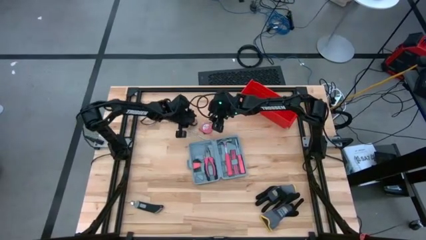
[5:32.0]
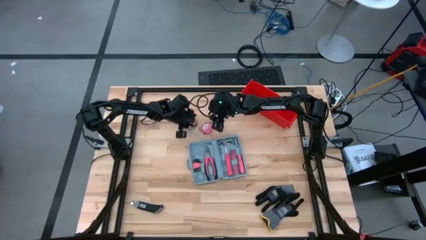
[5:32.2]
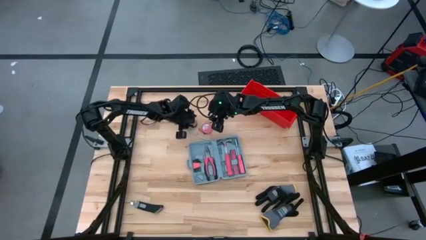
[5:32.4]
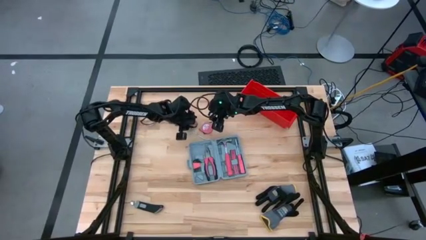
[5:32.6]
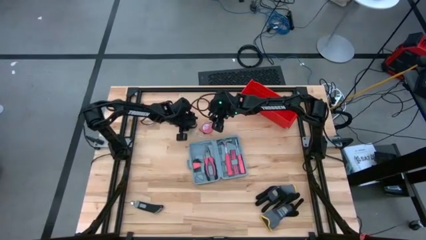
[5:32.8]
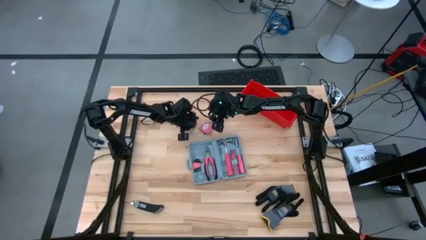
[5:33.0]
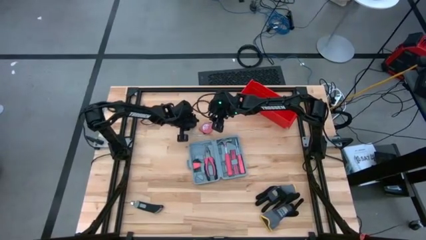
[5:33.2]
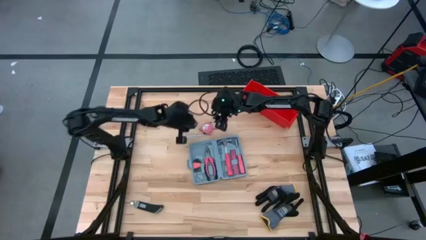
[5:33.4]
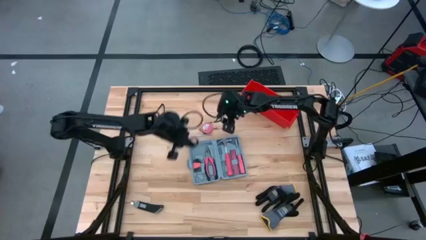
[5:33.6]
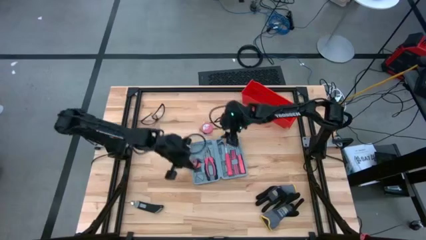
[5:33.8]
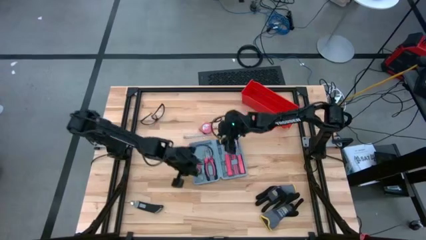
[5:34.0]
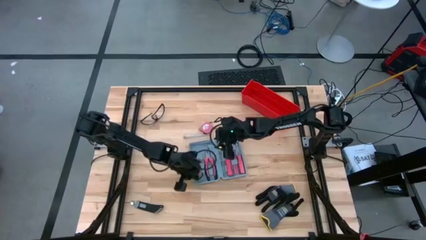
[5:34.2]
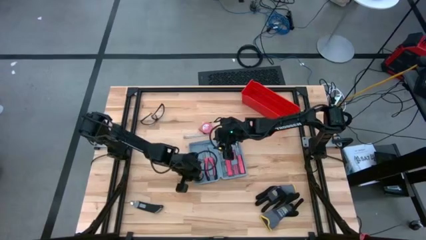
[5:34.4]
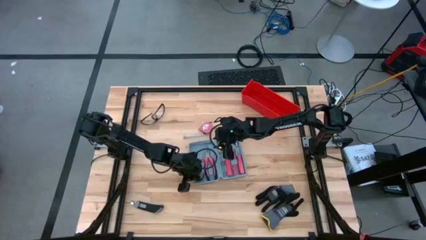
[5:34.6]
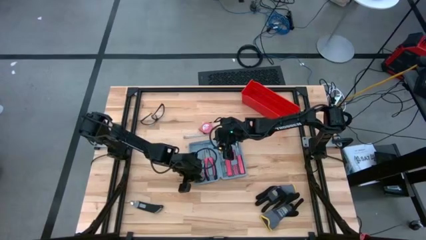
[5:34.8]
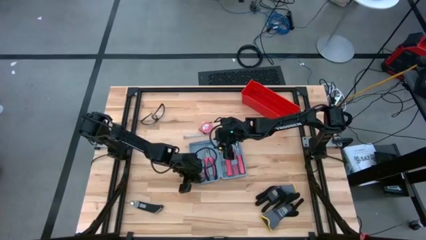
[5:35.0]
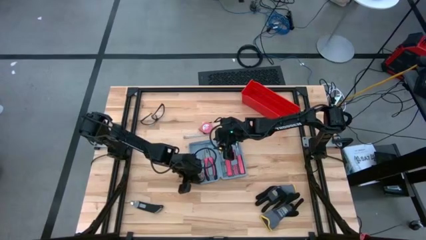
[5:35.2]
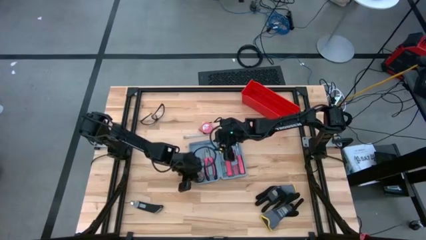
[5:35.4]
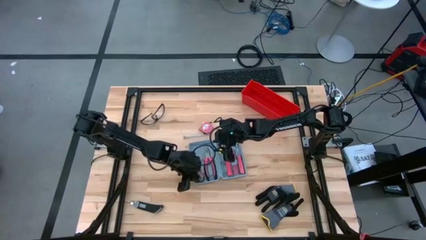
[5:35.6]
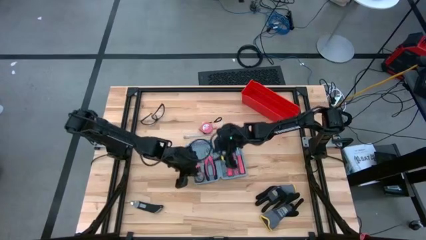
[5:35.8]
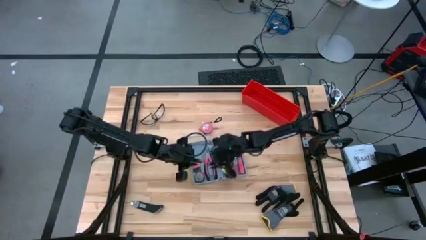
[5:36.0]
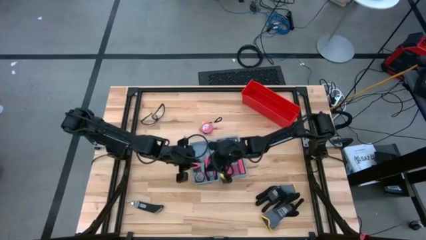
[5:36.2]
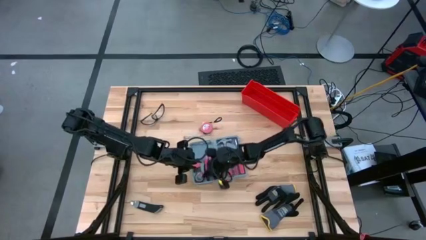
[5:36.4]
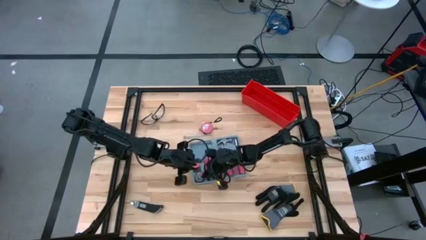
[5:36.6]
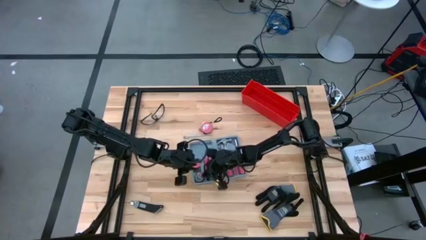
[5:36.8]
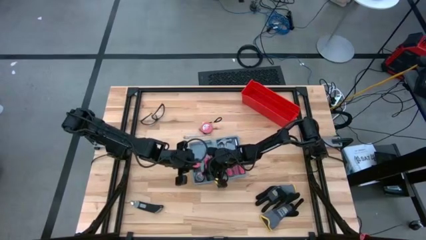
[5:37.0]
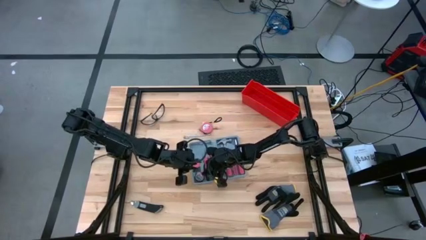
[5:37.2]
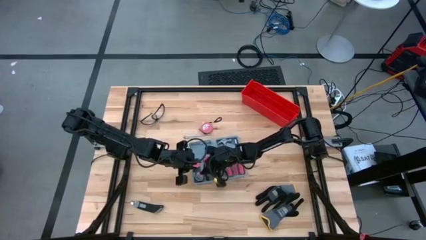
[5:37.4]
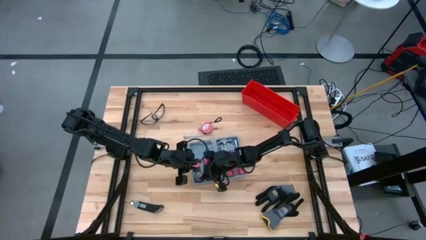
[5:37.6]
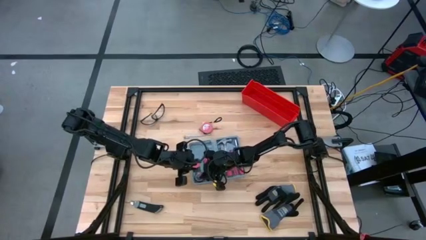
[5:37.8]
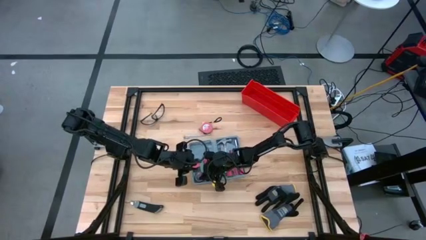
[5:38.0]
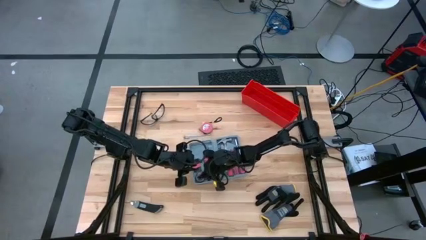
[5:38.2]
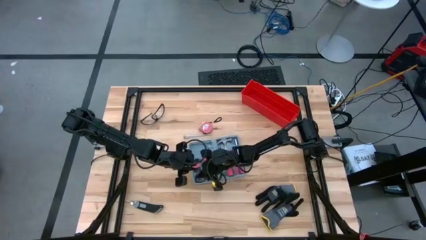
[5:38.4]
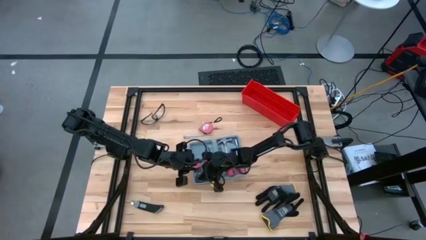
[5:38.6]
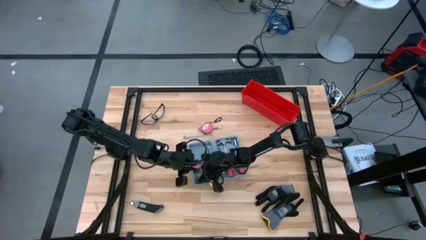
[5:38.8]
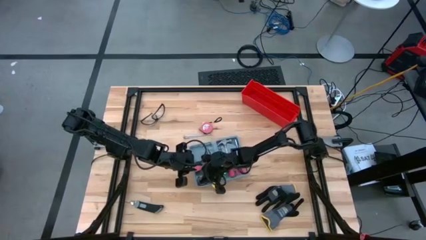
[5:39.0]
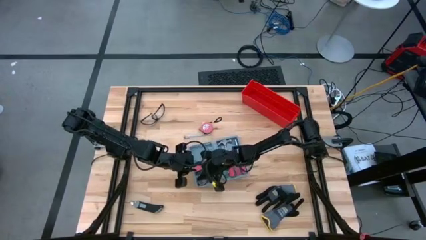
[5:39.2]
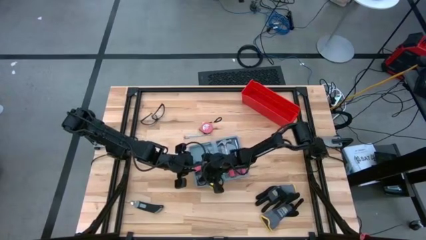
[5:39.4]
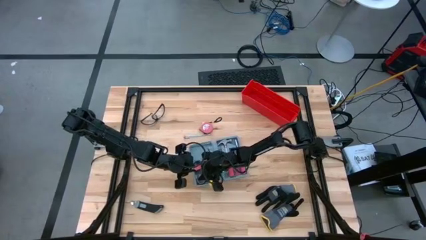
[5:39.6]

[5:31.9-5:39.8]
Task: prefit tool cases
Put the electrical tape into the toolbox

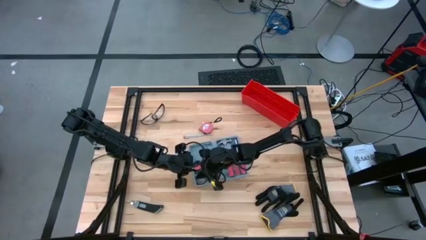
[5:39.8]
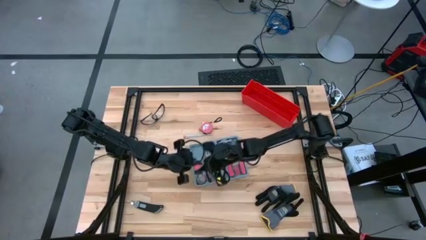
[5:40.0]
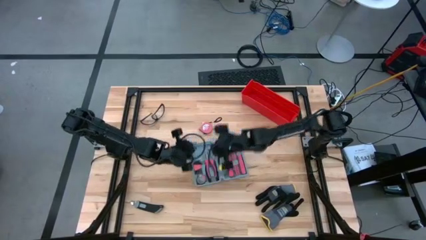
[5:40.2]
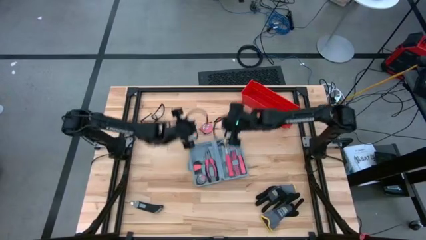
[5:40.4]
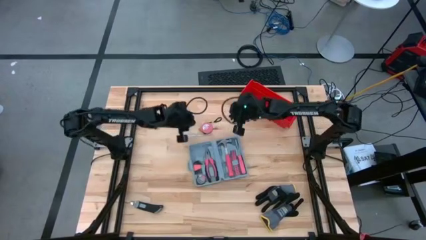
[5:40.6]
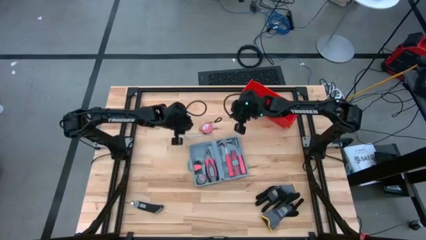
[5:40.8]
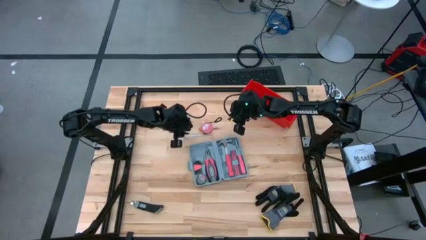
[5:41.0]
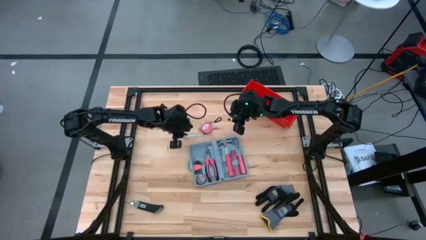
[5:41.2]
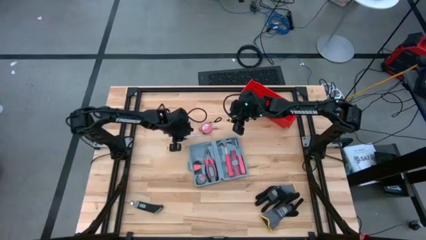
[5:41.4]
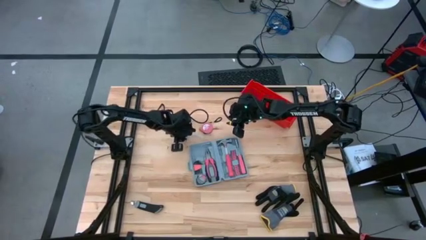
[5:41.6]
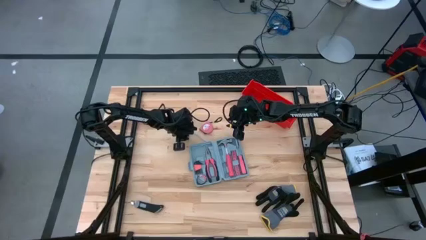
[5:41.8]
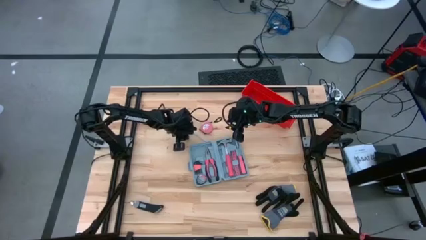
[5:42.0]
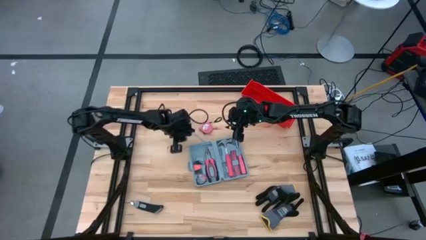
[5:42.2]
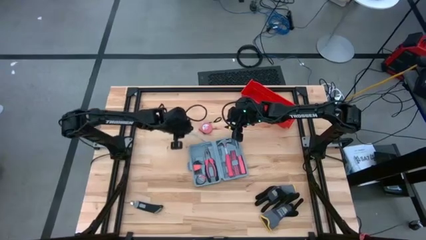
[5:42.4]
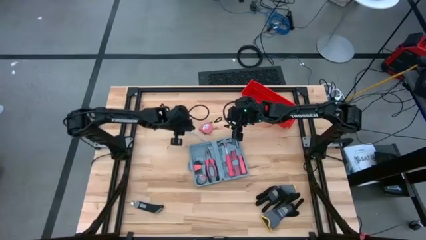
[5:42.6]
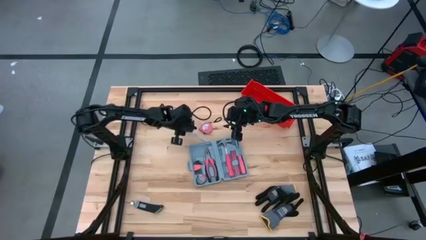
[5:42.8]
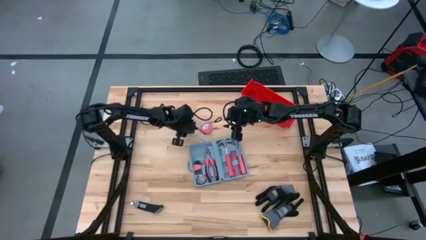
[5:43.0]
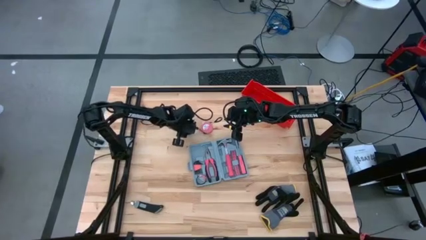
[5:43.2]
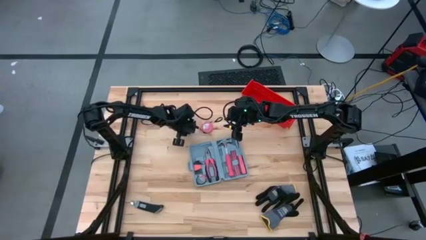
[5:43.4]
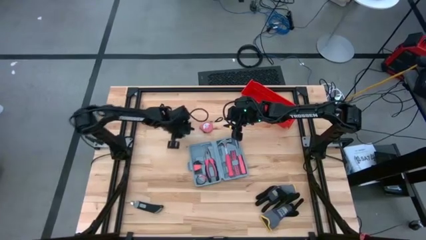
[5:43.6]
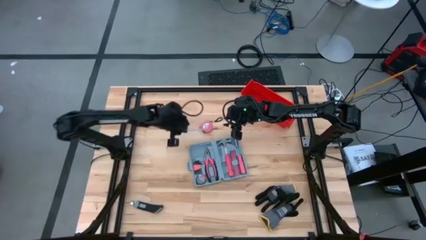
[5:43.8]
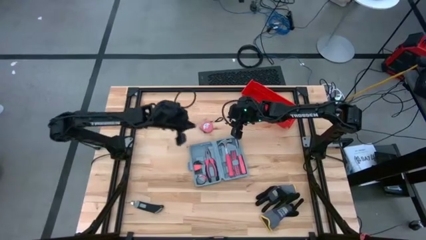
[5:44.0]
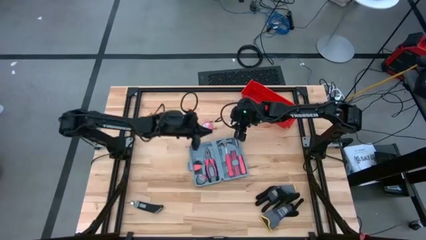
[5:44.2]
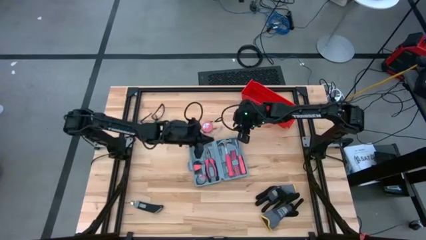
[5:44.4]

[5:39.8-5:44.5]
Put the voltage tester into the toolbox

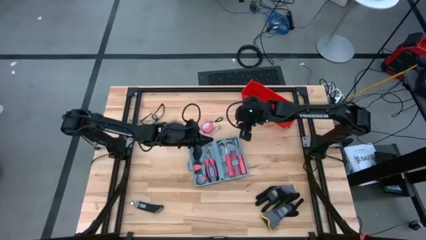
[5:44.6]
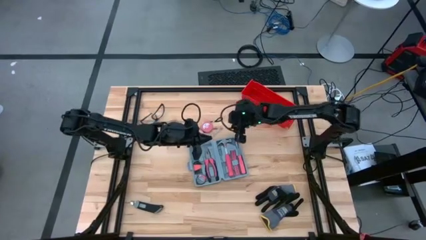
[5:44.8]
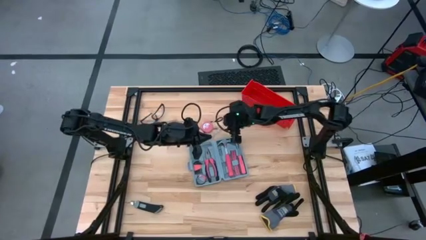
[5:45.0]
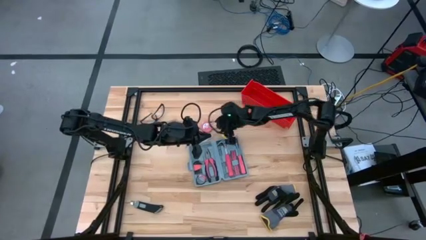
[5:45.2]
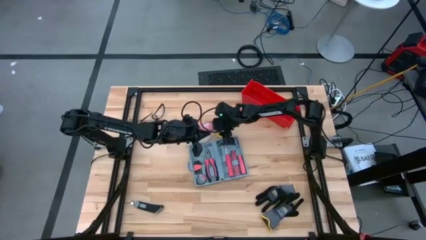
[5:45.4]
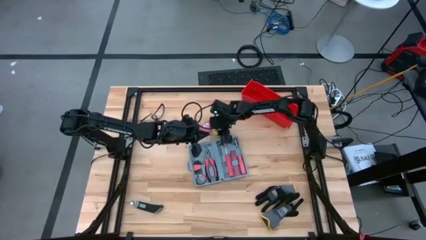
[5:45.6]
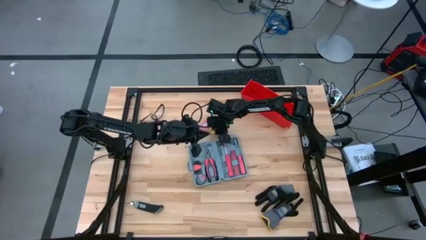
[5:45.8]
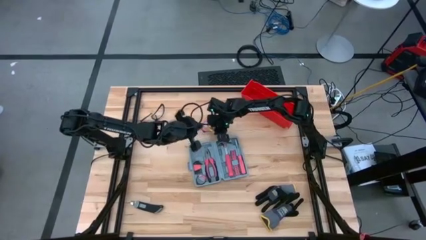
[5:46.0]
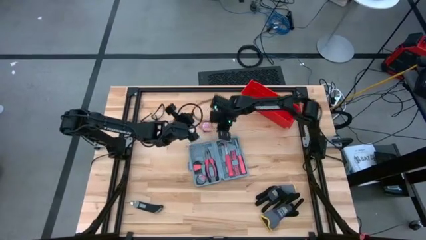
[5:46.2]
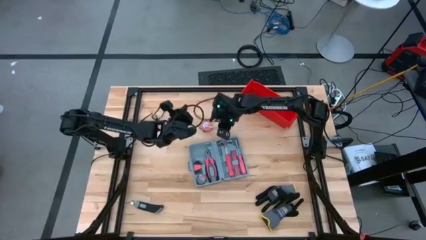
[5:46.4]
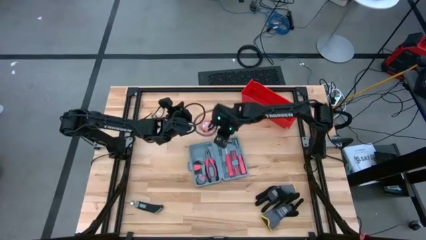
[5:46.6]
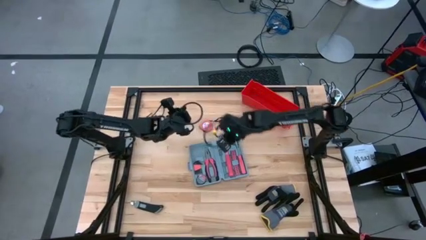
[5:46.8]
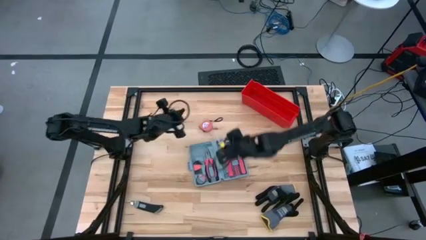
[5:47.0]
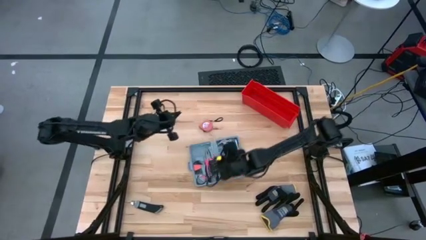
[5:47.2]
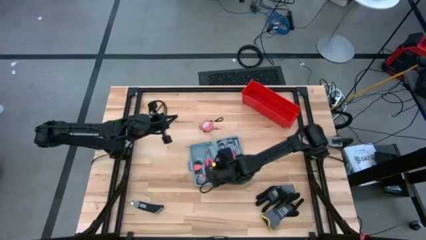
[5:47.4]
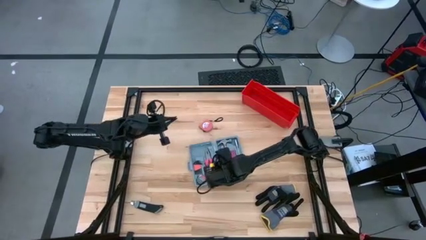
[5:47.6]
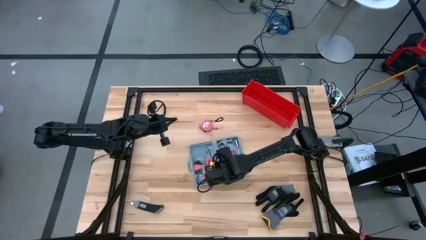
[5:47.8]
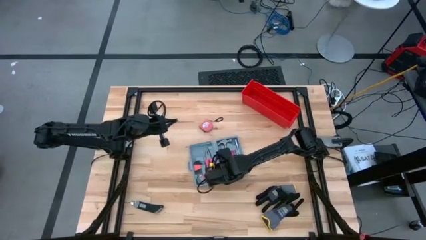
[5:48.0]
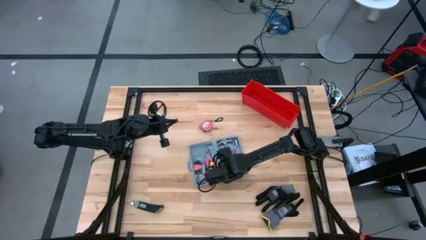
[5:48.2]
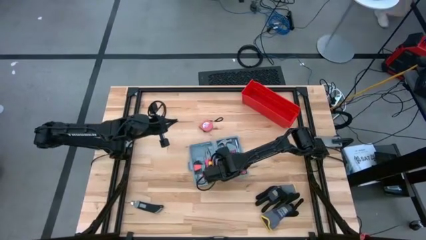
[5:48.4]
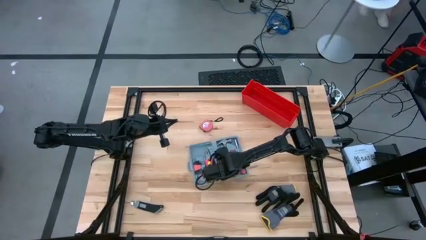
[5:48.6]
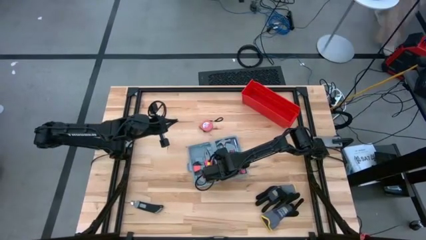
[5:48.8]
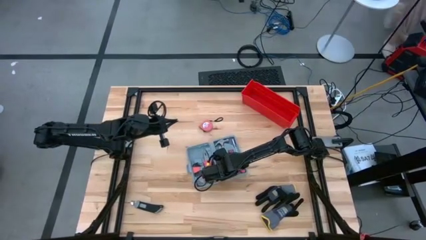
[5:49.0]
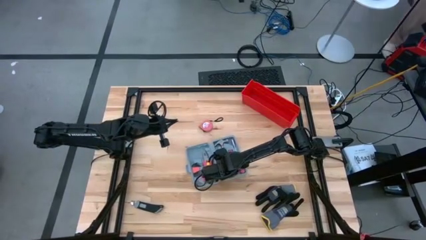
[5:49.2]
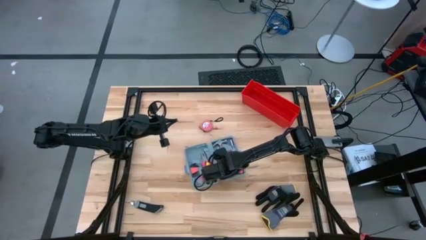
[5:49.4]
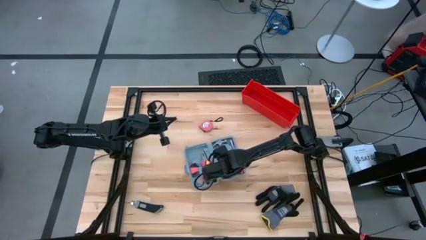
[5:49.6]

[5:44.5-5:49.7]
Put the voltage tester into the toolbox
